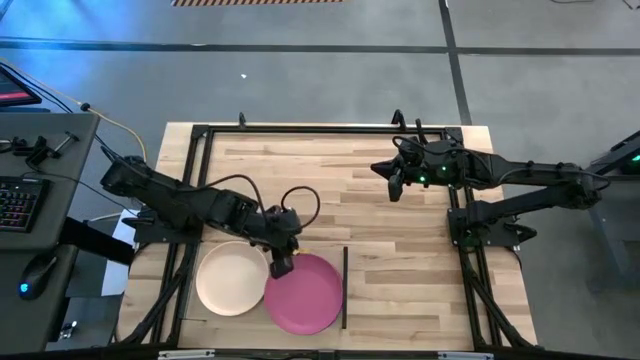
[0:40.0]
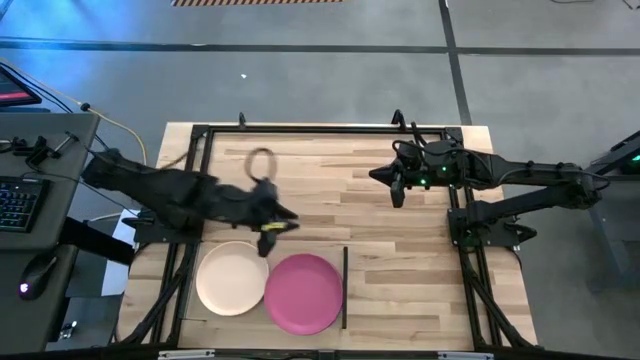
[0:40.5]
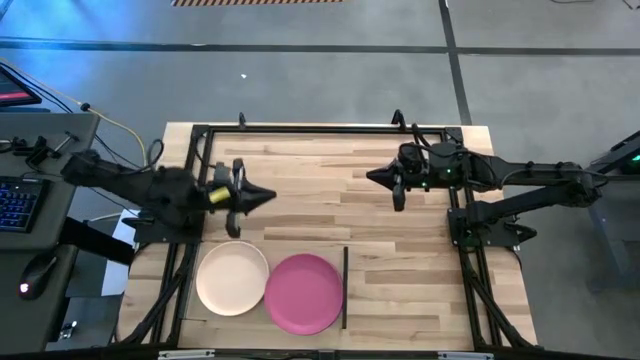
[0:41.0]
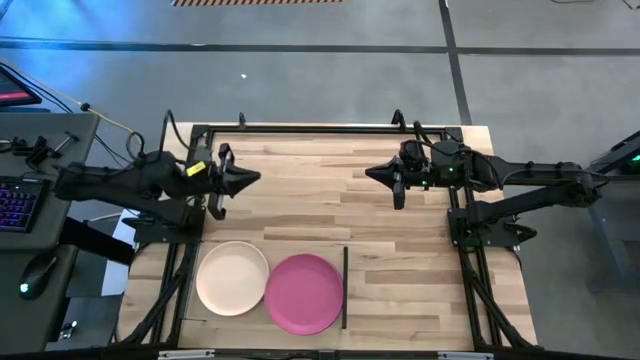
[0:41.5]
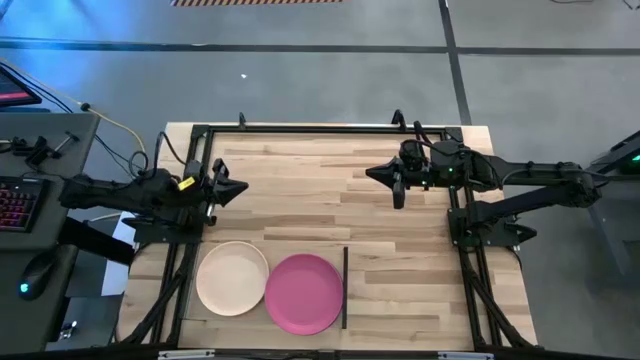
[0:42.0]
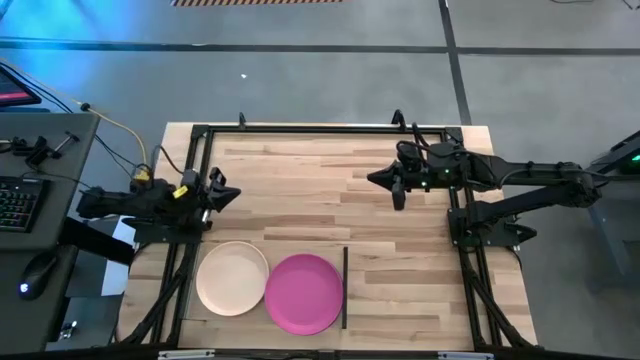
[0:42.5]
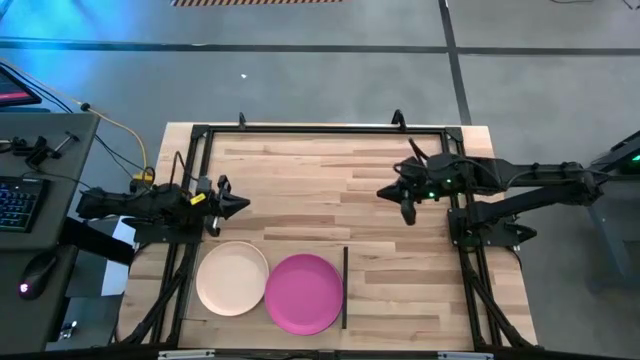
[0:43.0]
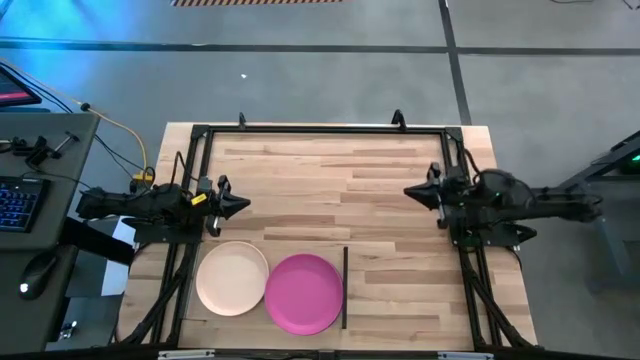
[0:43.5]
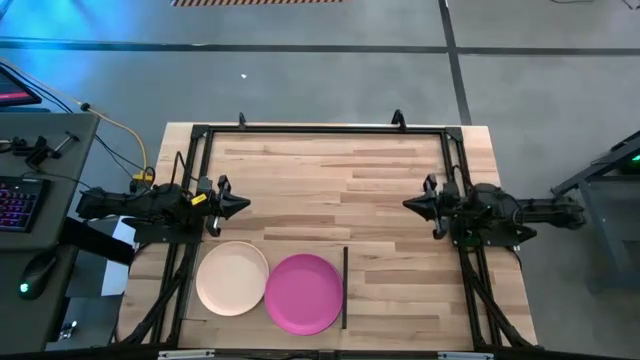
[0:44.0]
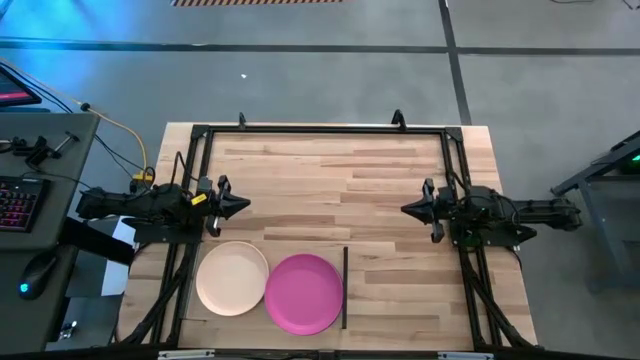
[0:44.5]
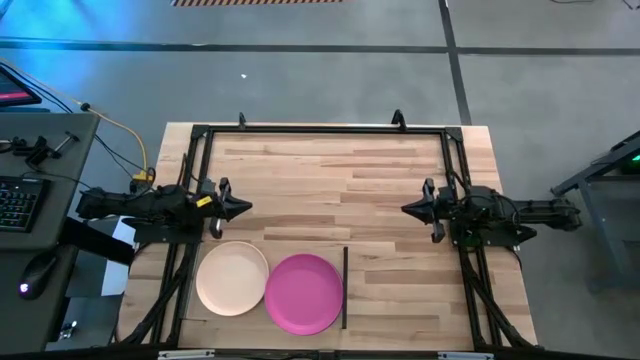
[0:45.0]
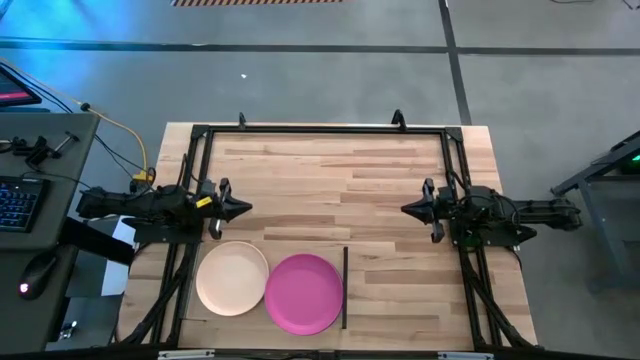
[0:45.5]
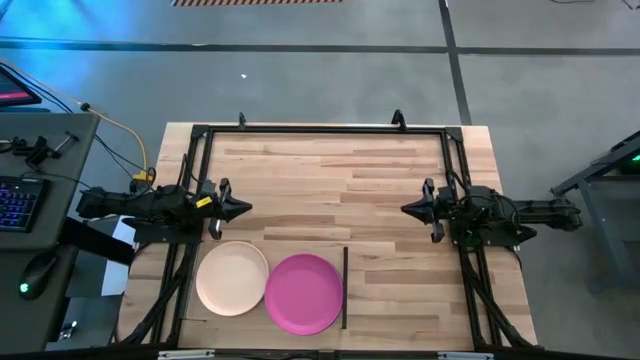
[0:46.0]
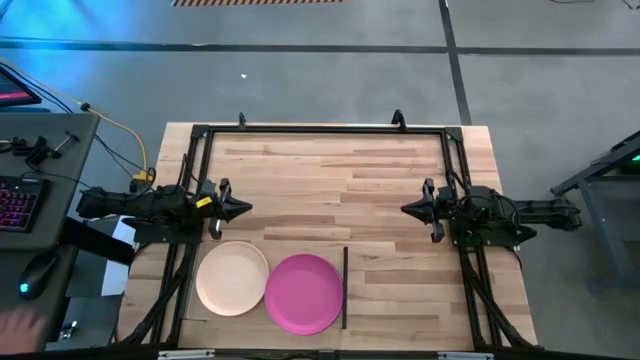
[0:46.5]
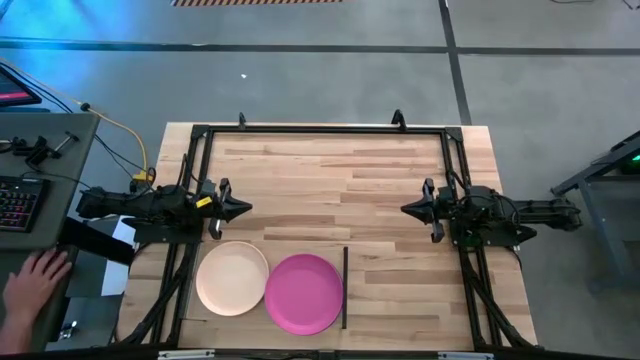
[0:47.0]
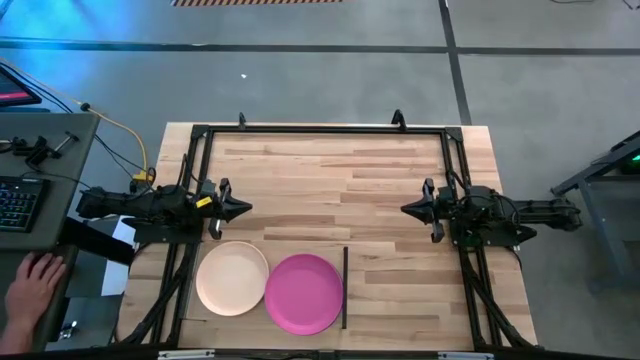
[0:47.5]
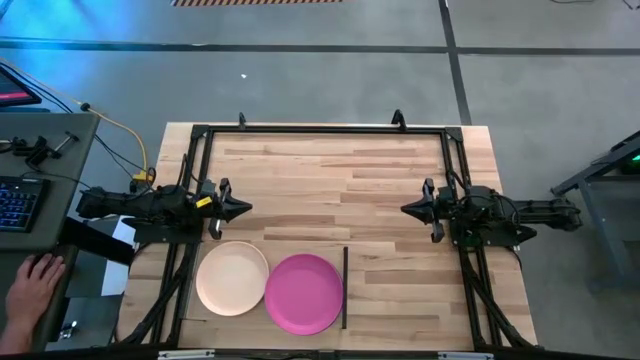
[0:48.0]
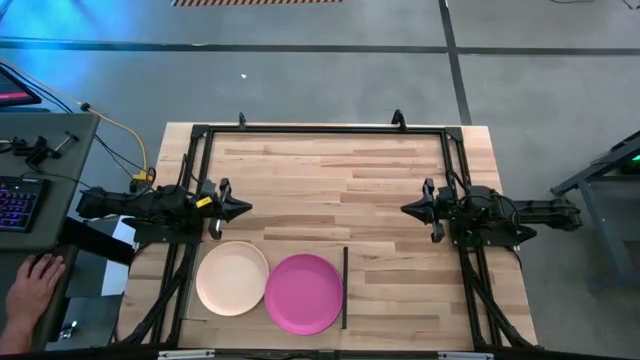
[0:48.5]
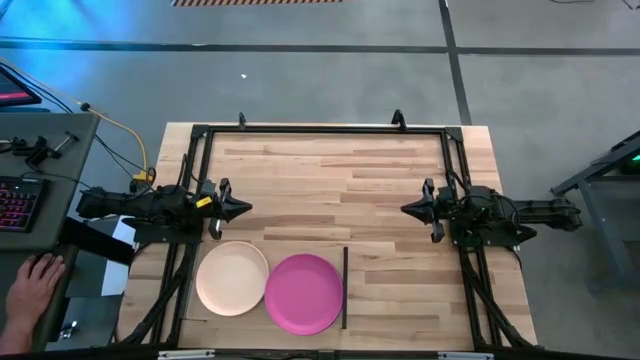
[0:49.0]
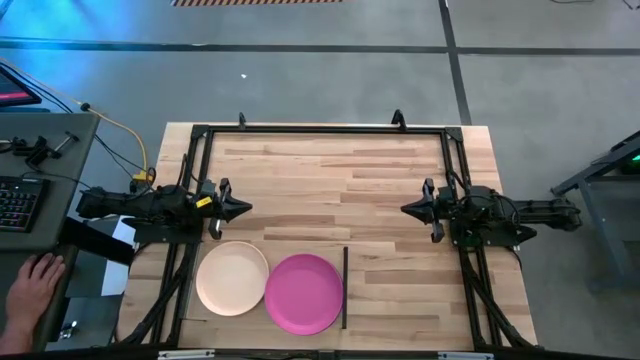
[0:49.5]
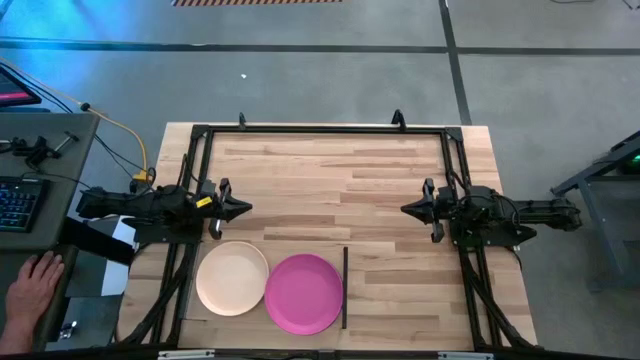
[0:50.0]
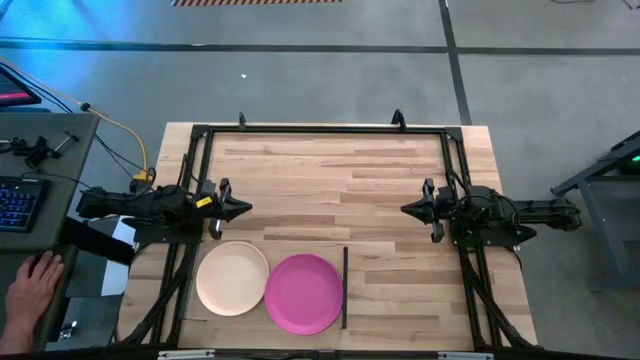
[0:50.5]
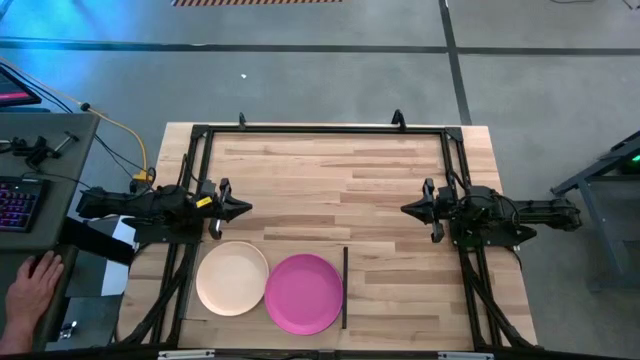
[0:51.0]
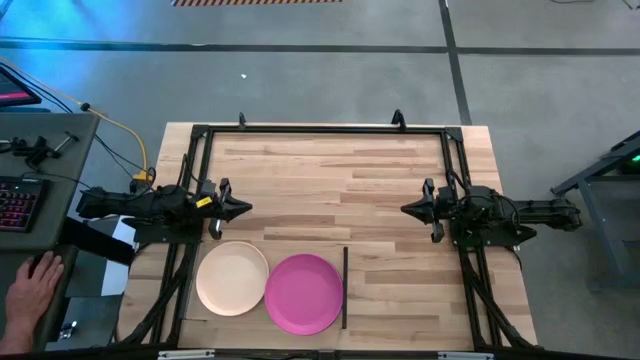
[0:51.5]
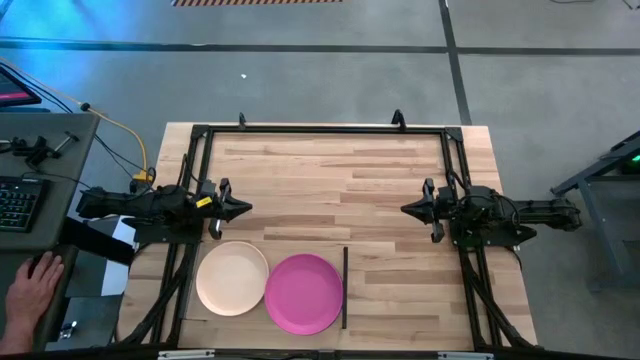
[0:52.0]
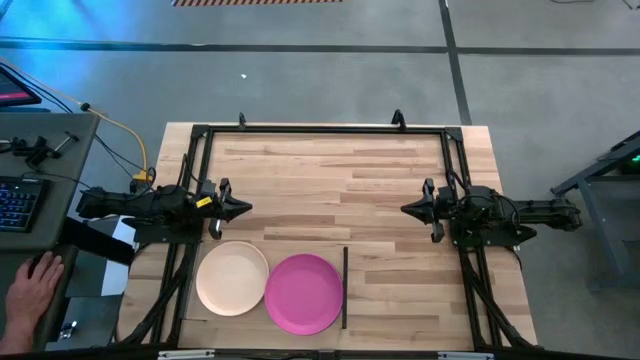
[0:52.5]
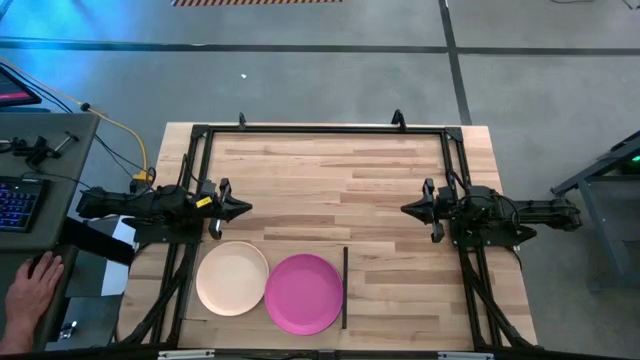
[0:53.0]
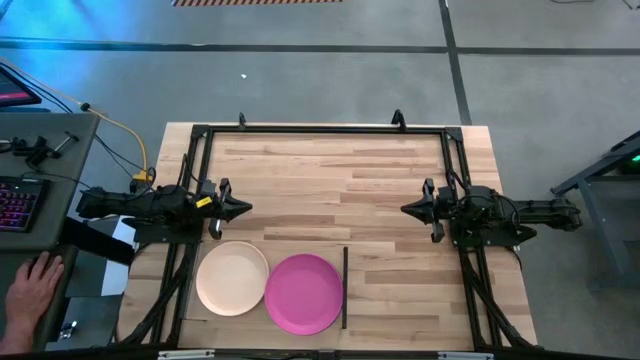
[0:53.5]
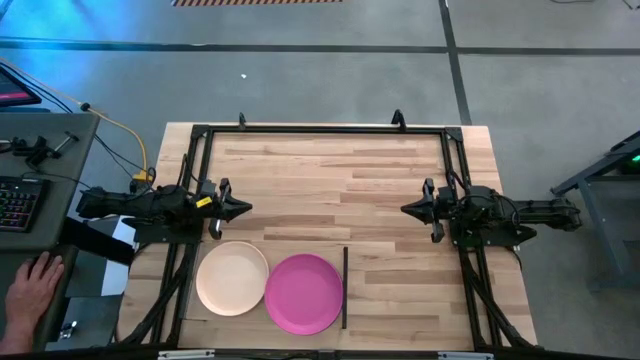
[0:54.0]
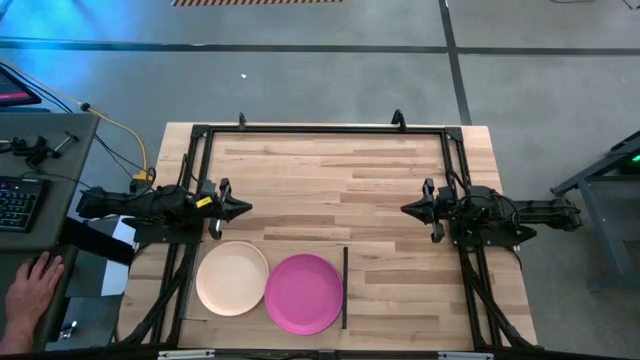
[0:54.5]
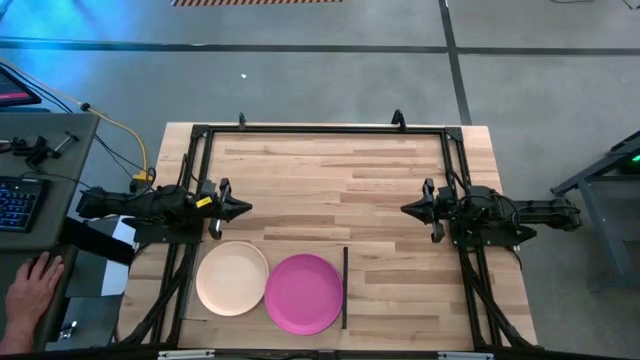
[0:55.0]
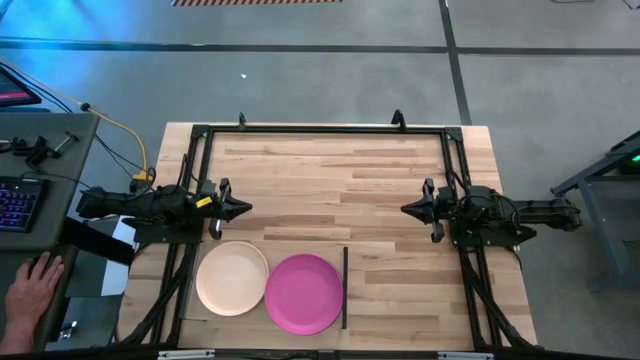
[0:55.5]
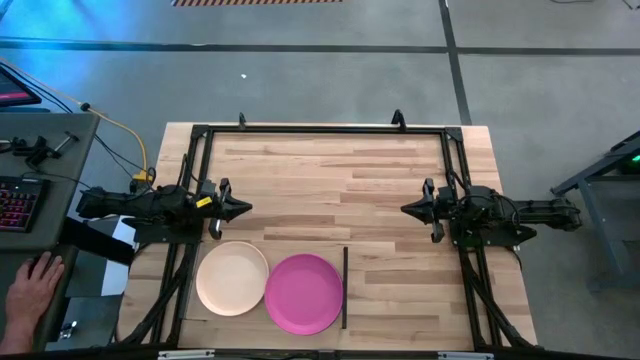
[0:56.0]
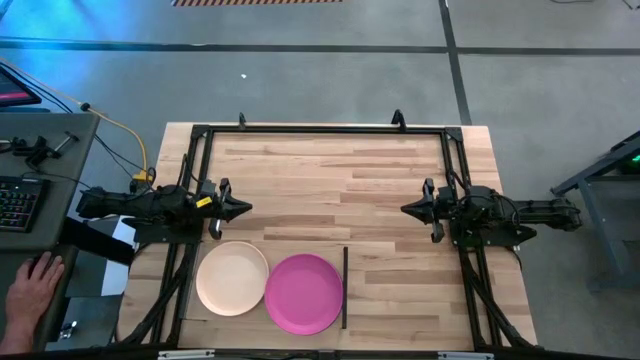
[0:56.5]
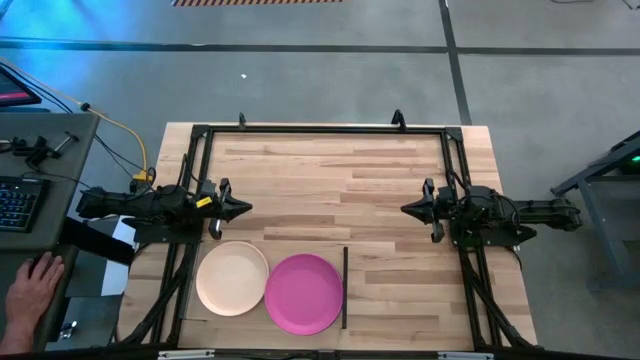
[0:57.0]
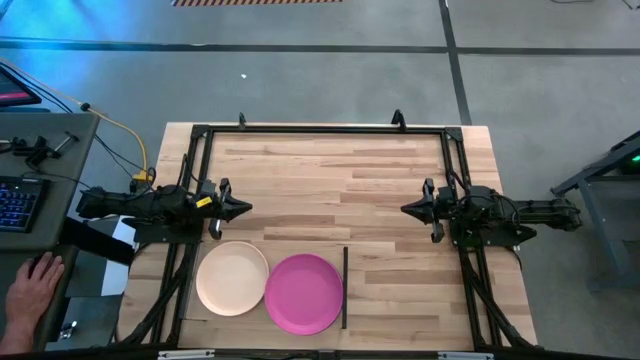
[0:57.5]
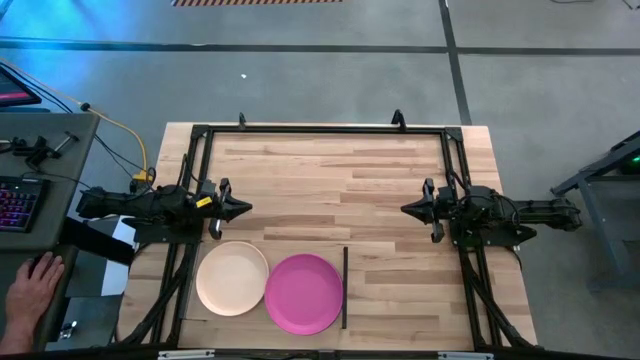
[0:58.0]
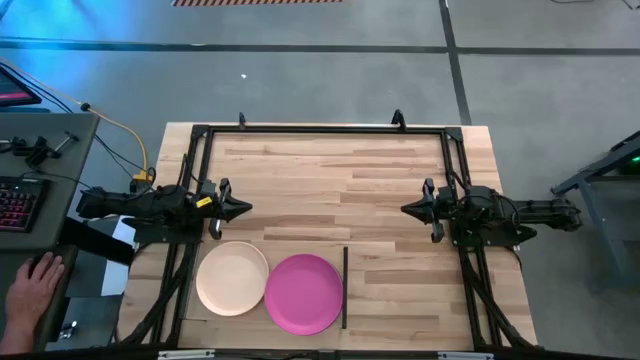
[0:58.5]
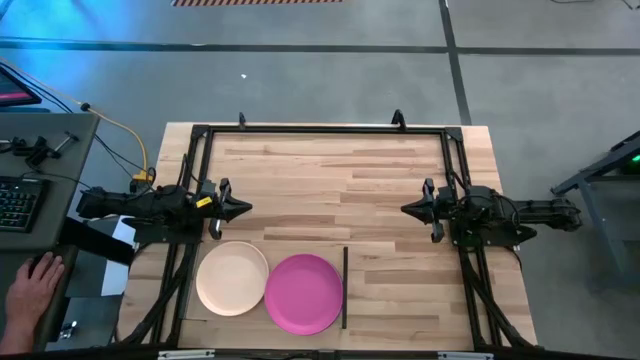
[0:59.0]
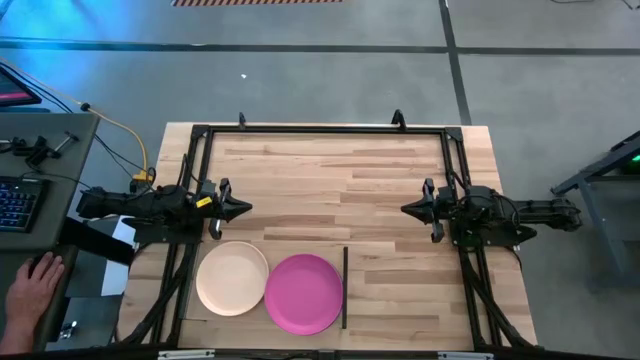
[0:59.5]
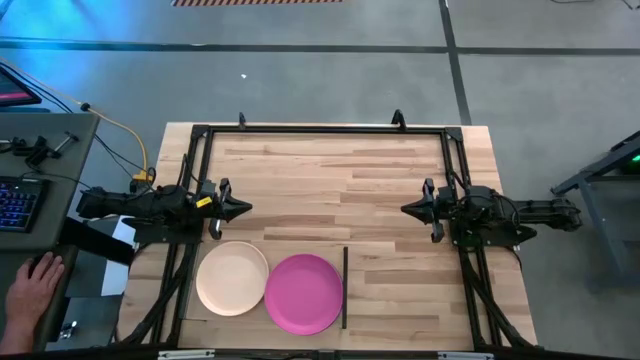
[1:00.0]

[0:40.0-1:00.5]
Task: Place and stack plates onto a shelf
Return to Home Position

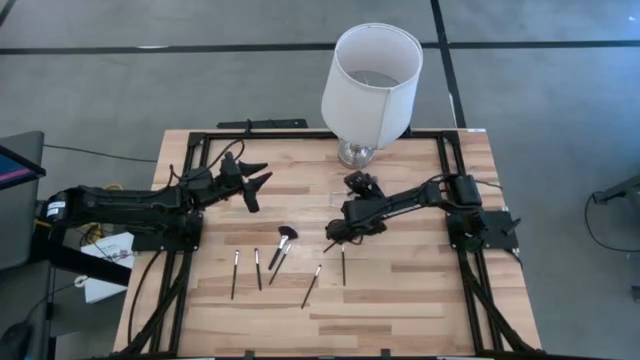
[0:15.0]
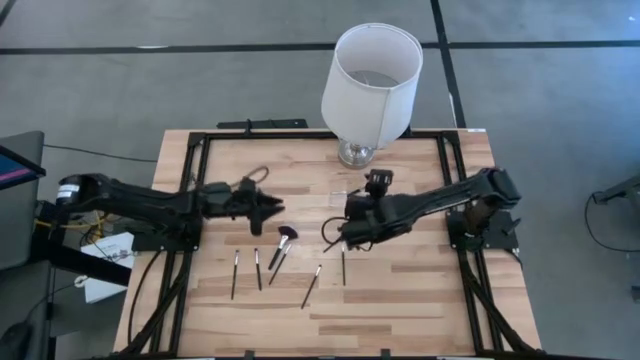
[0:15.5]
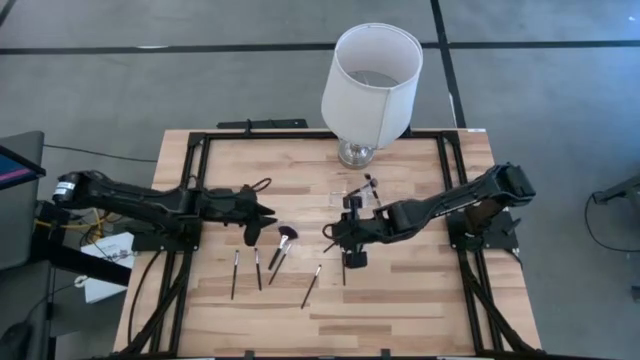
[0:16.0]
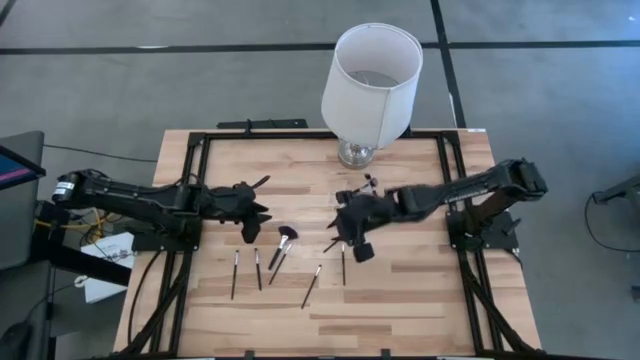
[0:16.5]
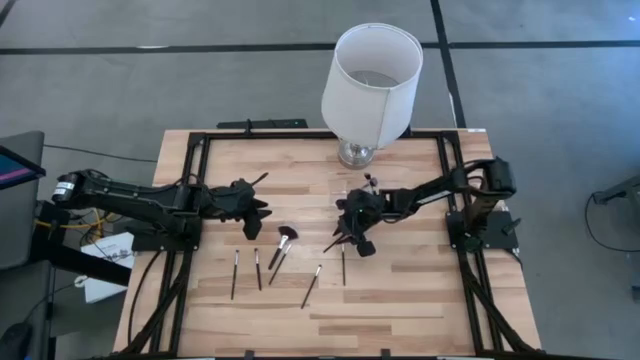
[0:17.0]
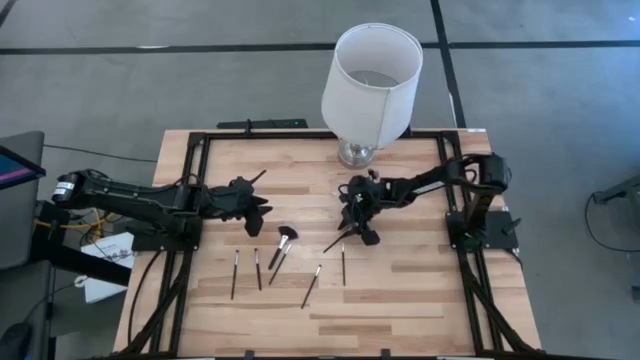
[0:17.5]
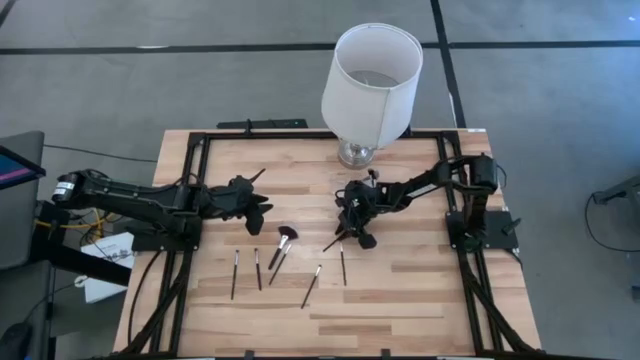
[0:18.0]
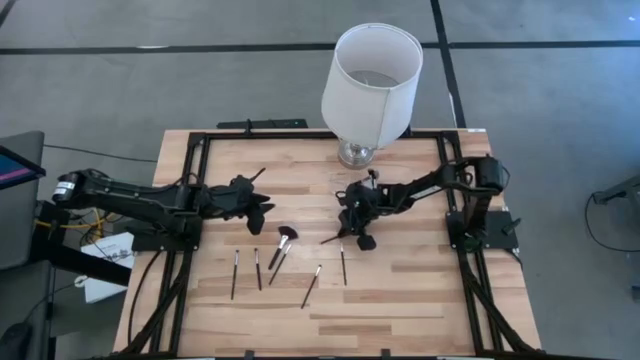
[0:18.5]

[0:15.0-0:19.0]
Task: Put items in baskets/containers
Put the black eyeshadow brush into the transparent organizer
